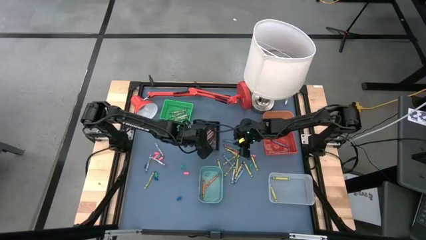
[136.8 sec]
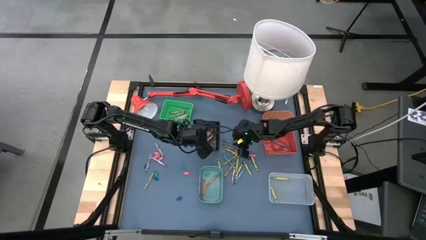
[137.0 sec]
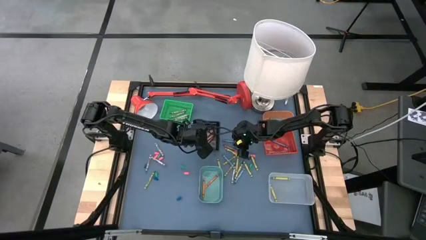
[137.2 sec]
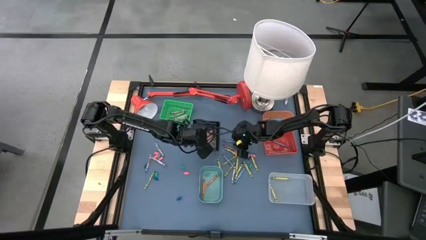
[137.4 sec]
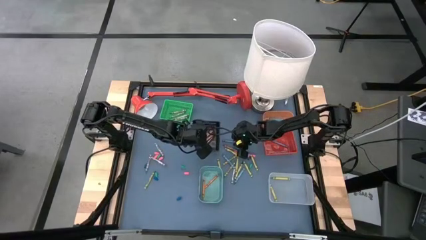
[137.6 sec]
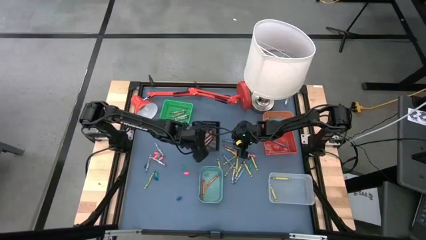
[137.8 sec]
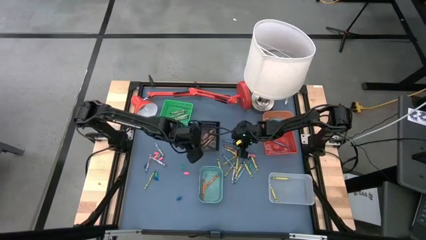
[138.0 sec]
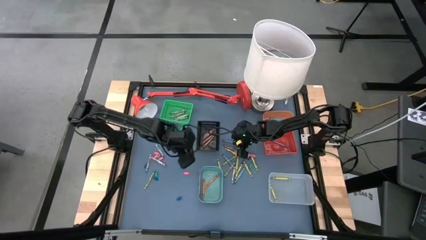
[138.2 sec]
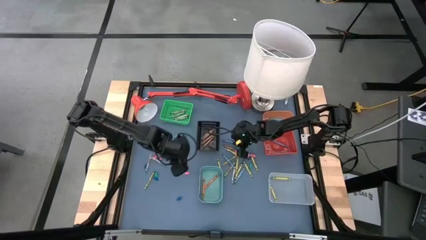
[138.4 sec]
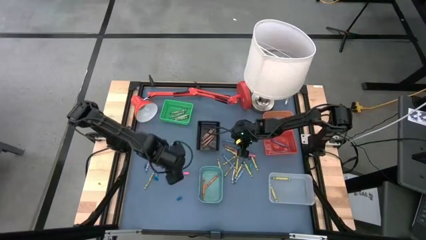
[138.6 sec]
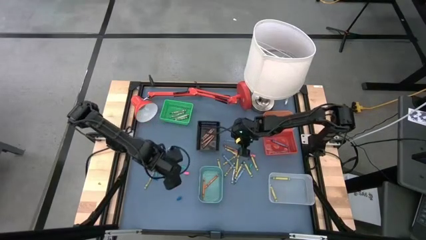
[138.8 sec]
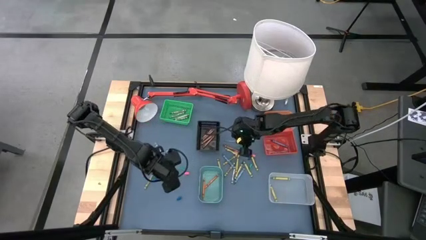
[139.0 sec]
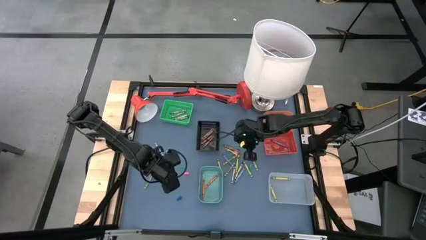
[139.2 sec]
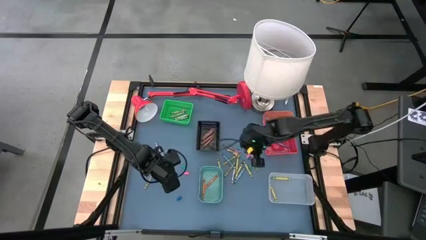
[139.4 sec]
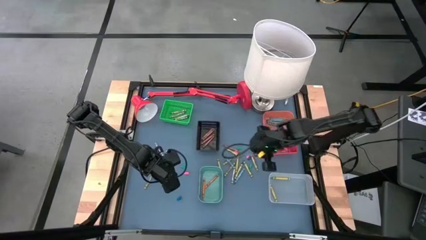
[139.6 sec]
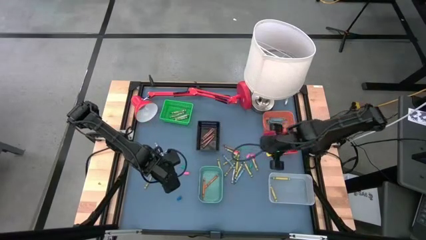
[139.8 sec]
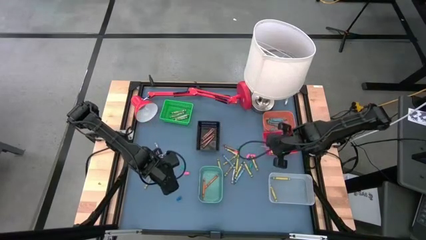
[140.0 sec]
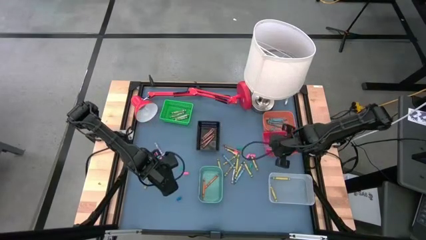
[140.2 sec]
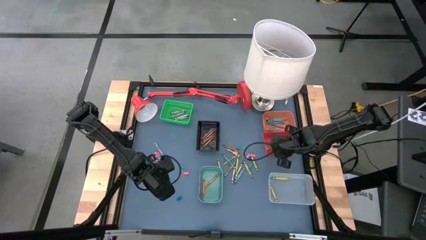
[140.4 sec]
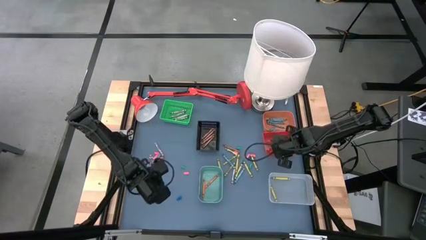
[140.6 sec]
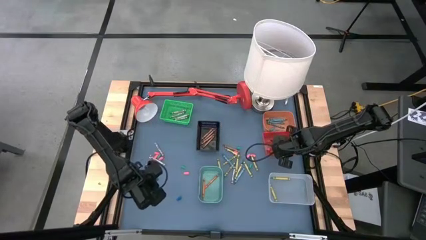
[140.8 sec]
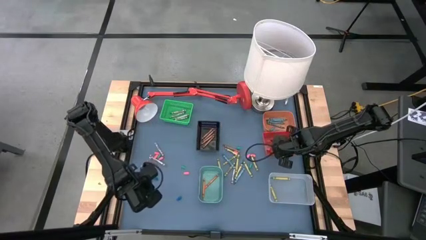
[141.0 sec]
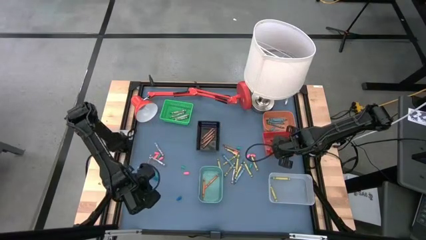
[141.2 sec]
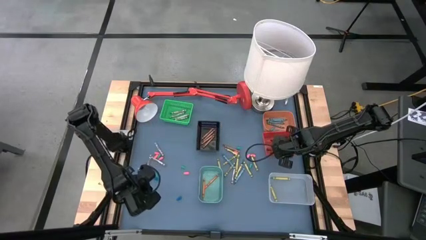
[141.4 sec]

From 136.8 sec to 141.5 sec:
Task: Sort crayons
Put the purple crayon into the red bin

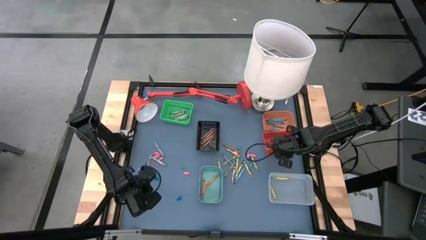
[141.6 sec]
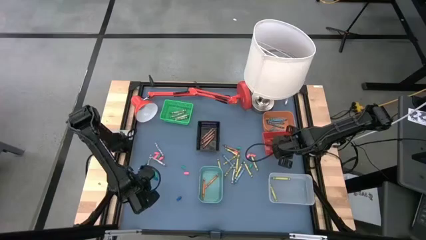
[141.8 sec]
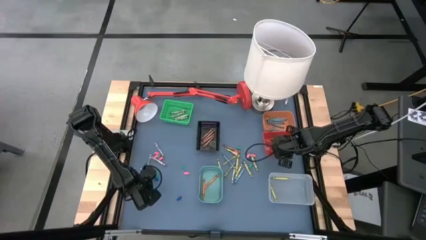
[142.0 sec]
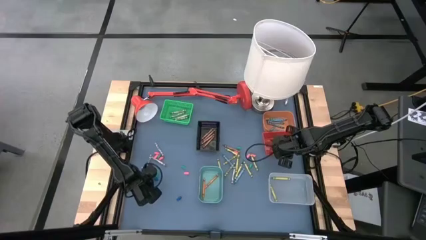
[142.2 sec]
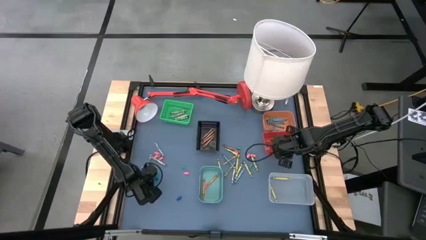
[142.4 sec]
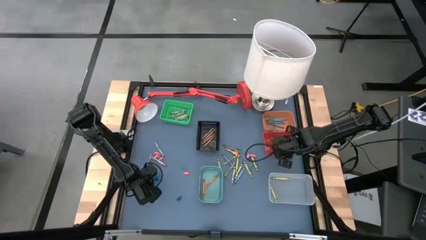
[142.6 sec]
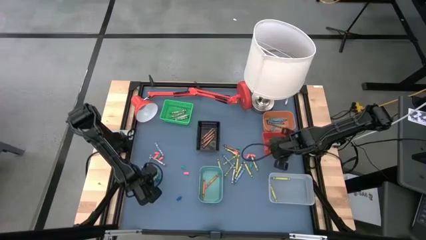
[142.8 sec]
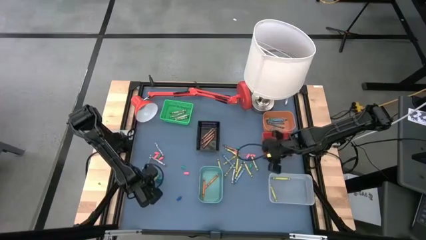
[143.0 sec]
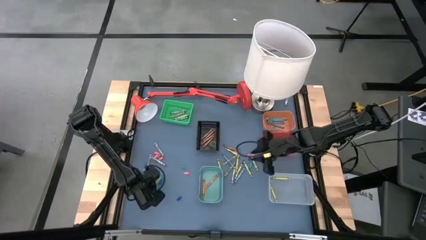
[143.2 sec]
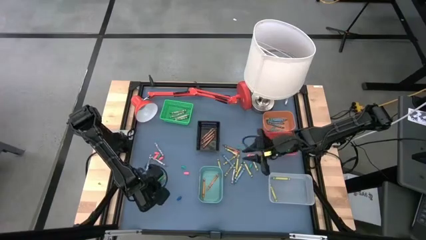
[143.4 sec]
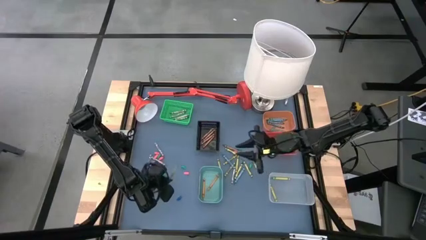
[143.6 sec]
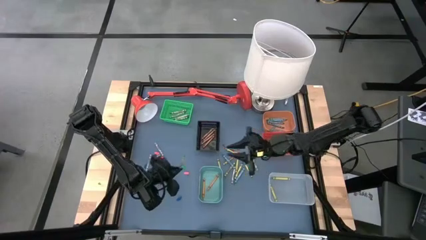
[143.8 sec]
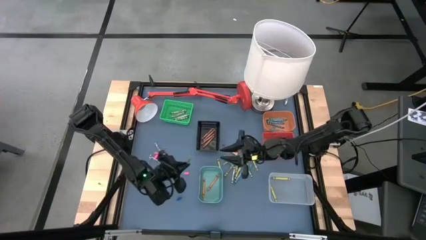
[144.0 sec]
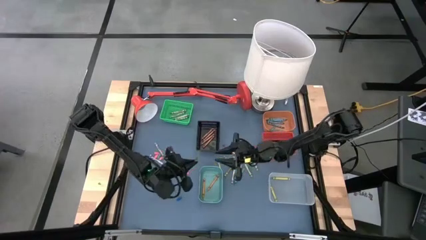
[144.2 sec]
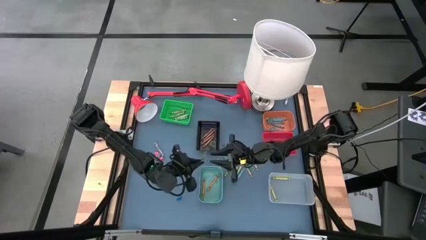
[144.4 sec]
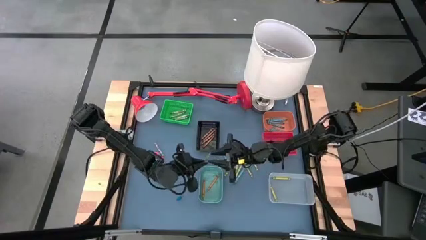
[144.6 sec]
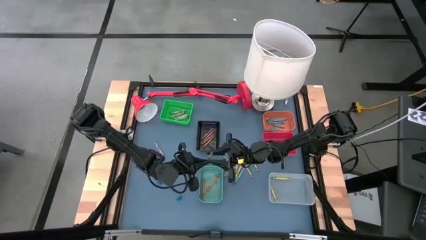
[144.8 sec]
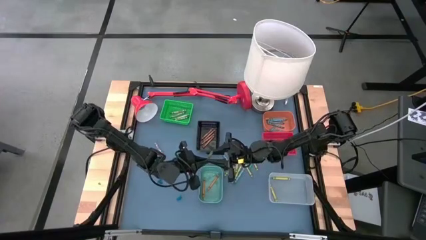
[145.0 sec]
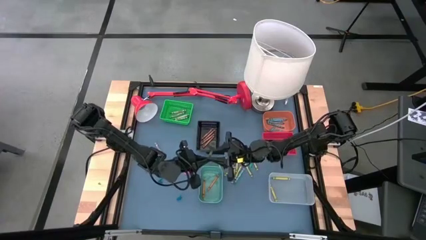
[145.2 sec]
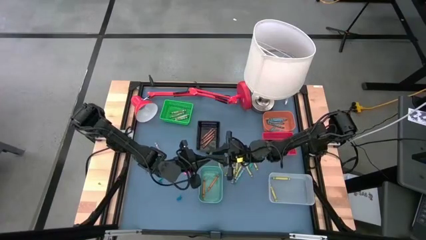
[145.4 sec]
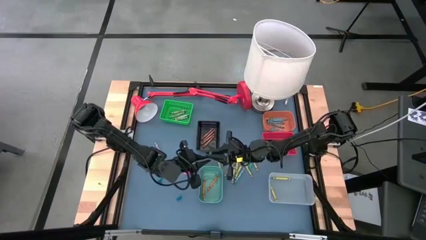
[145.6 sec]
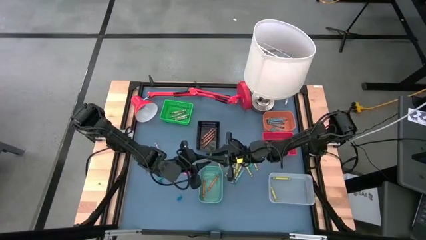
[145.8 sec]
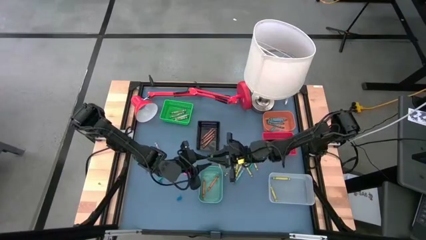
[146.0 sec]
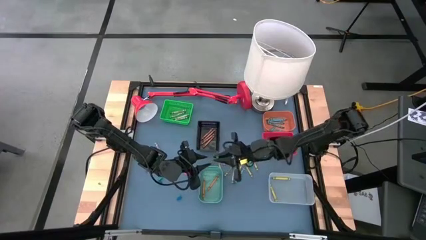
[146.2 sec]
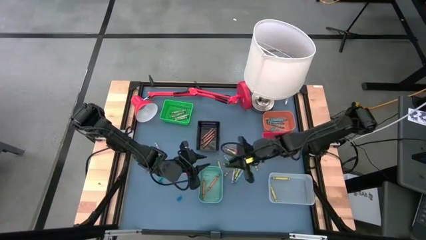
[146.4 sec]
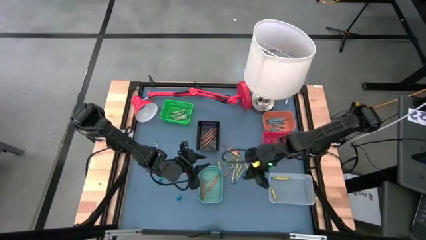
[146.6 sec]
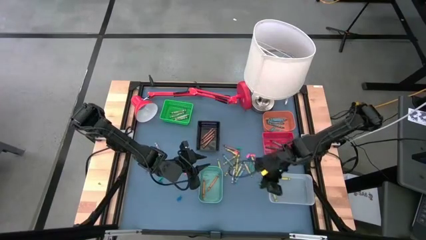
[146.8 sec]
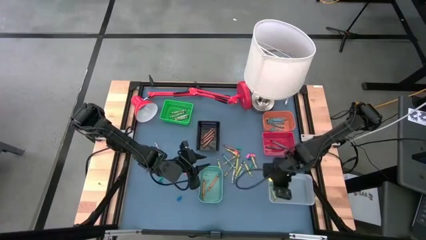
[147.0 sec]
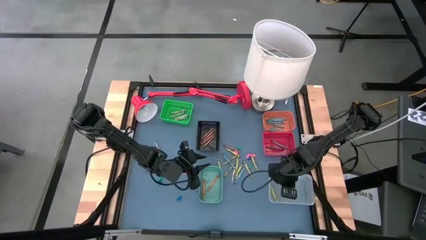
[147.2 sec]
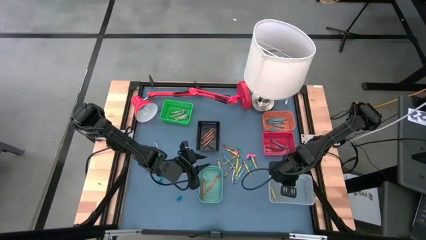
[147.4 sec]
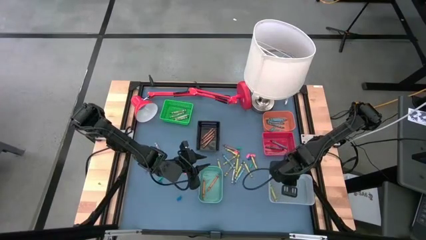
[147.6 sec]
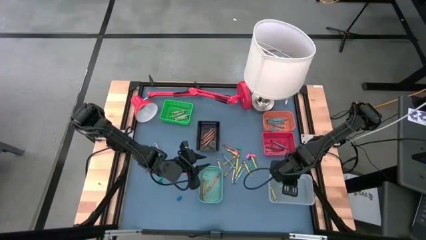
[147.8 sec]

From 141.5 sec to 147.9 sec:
Put the green crayon into the transparent bin

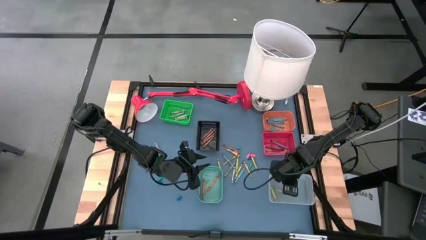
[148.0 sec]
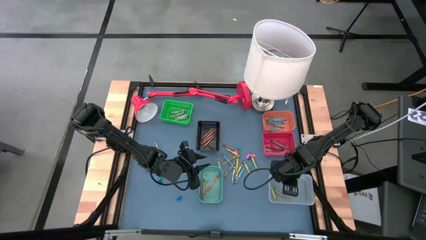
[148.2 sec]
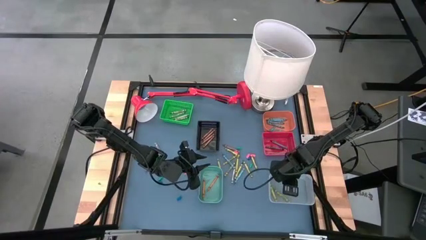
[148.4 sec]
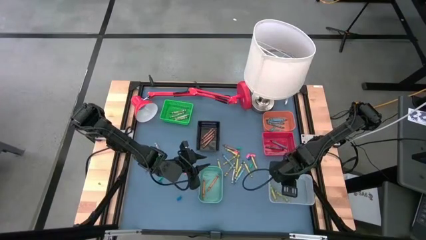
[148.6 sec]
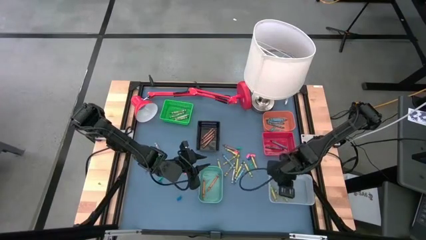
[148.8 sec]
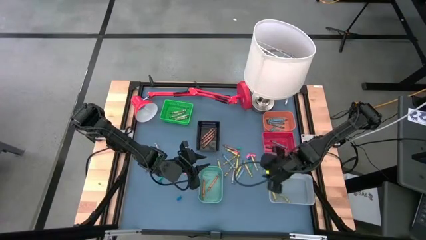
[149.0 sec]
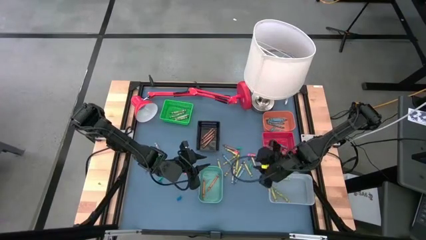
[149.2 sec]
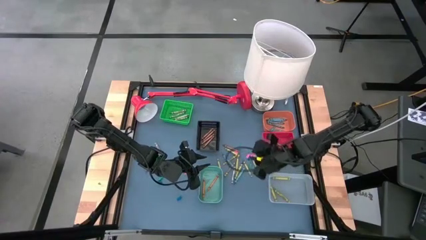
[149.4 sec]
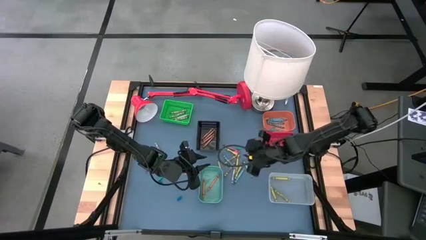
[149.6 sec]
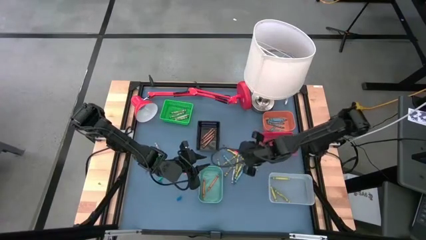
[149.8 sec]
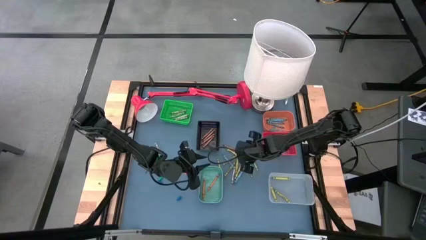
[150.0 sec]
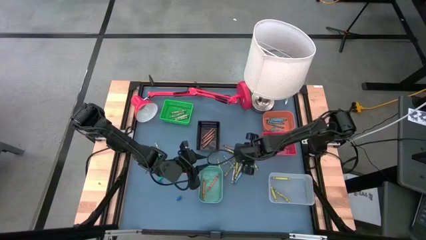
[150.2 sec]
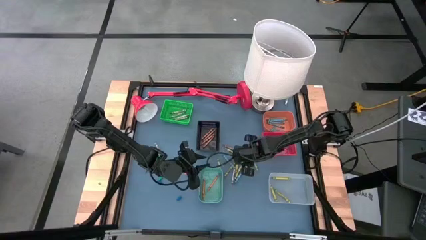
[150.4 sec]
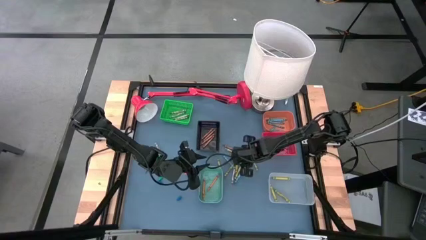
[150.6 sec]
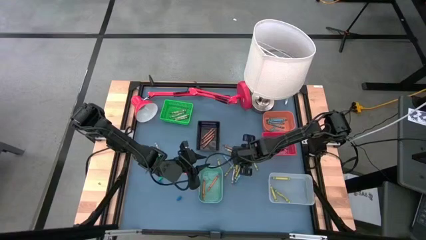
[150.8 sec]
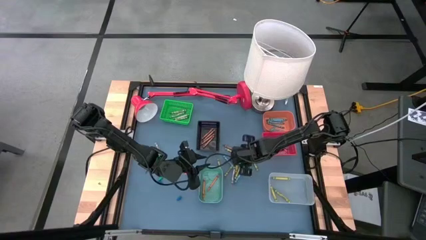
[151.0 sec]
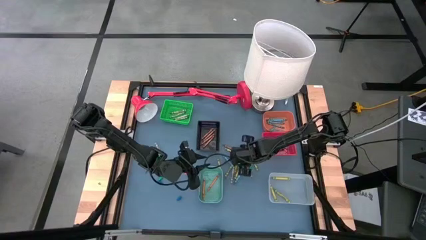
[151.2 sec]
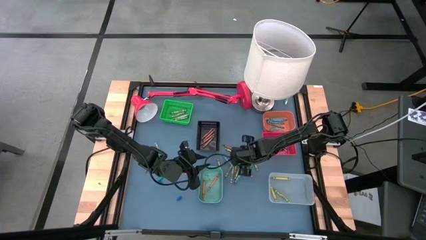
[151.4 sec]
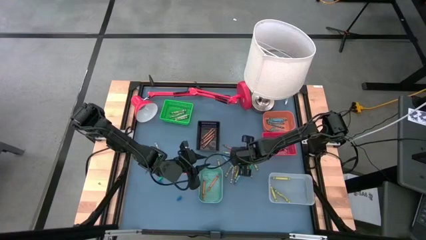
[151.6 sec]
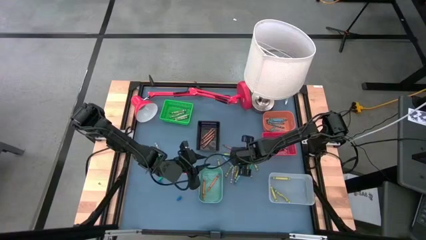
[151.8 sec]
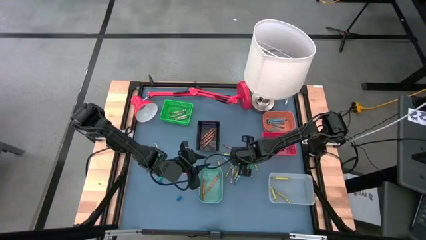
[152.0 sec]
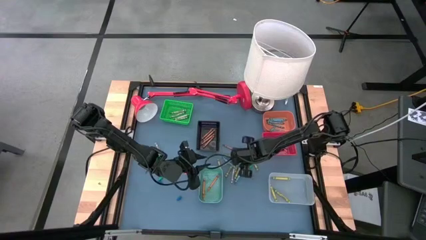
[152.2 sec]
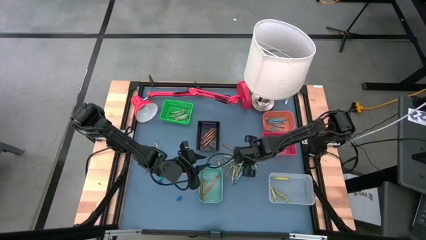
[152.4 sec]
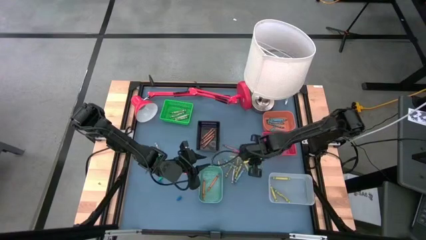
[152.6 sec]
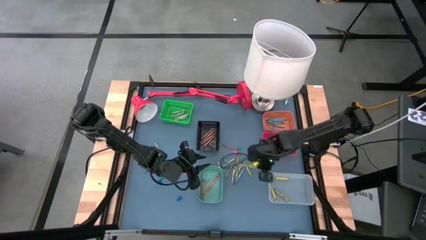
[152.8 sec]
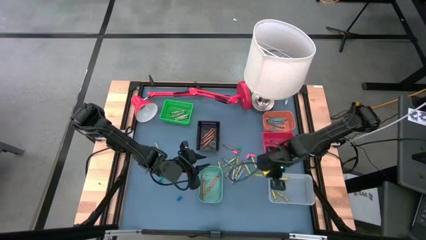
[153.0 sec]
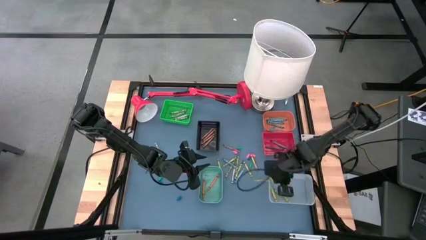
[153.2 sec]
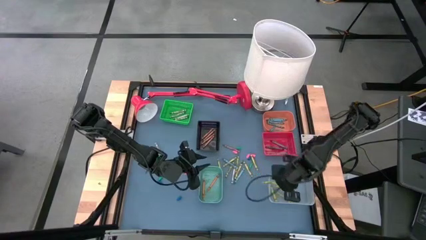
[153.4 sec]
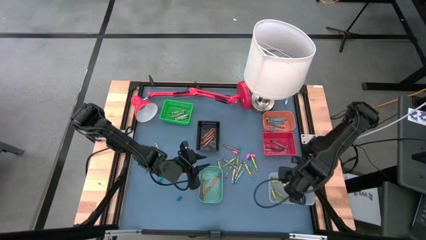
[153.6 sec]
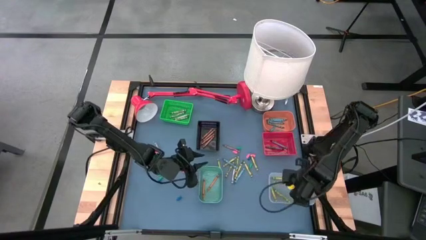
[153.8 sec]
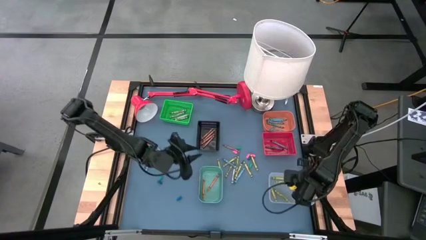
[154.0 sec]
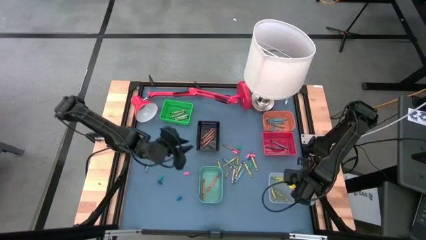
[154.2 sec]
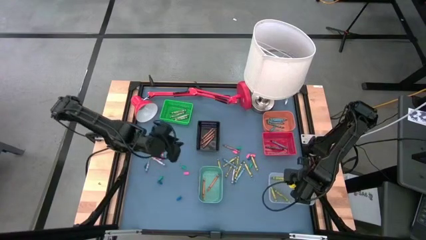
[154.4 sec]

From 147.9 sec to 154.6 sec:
Put the green crayon into the transparent bin
